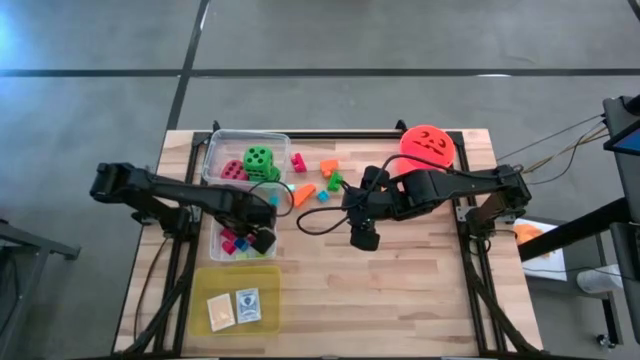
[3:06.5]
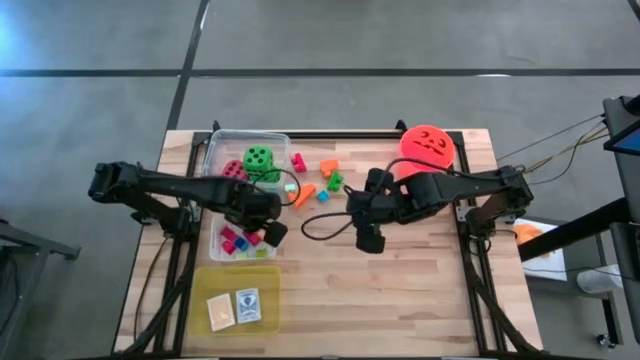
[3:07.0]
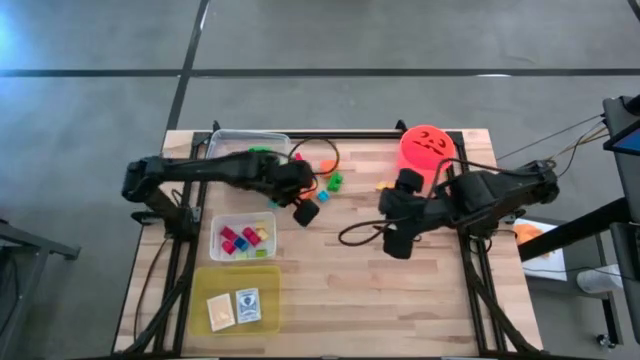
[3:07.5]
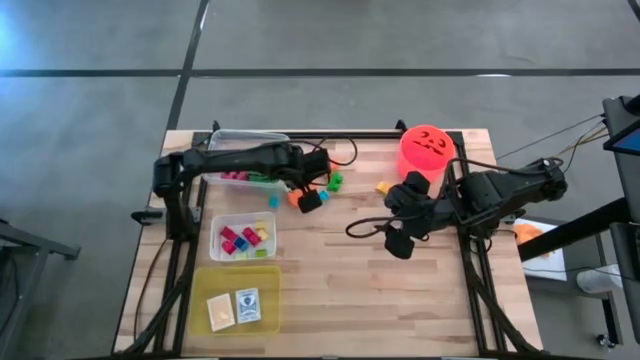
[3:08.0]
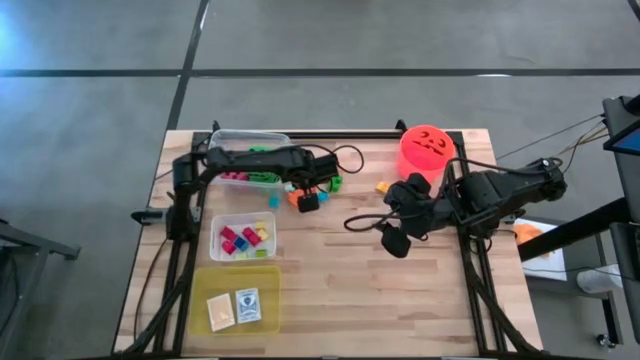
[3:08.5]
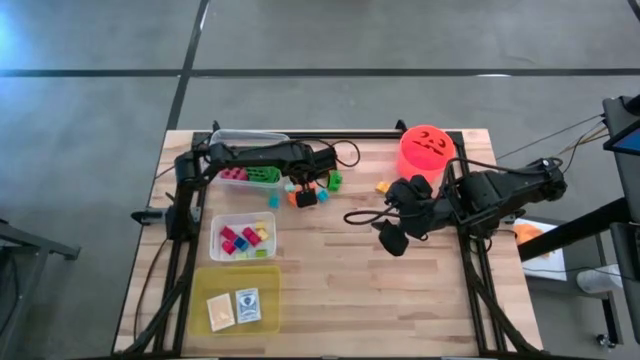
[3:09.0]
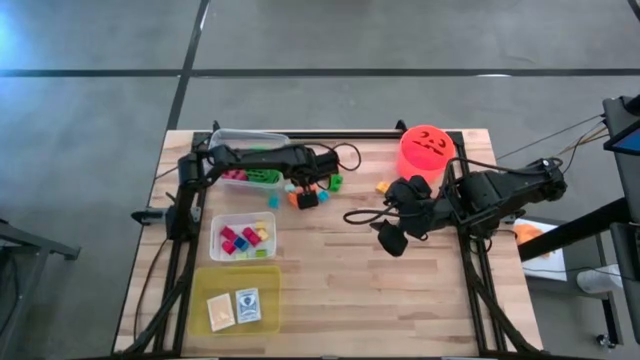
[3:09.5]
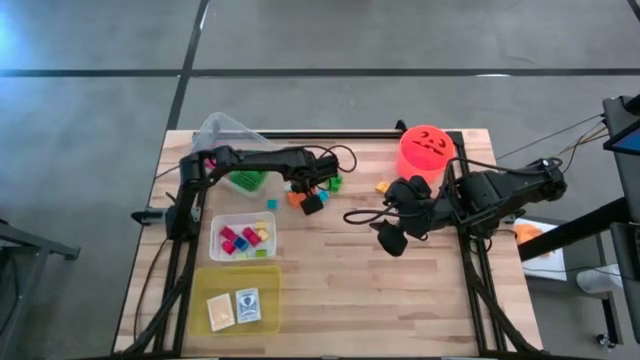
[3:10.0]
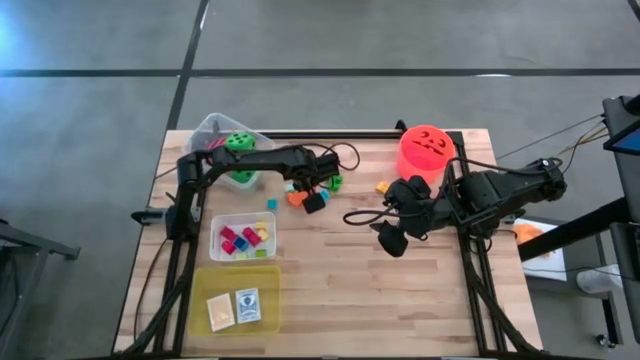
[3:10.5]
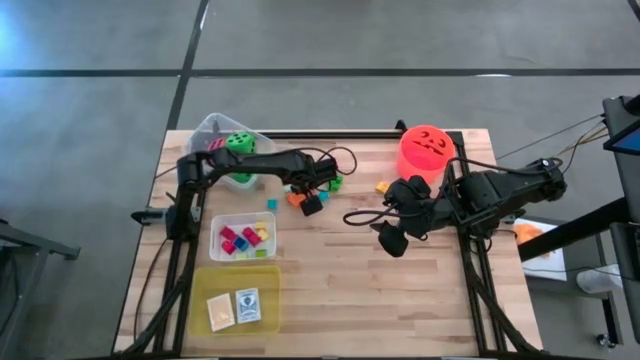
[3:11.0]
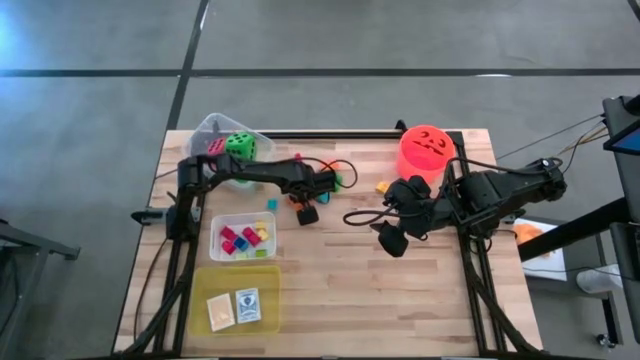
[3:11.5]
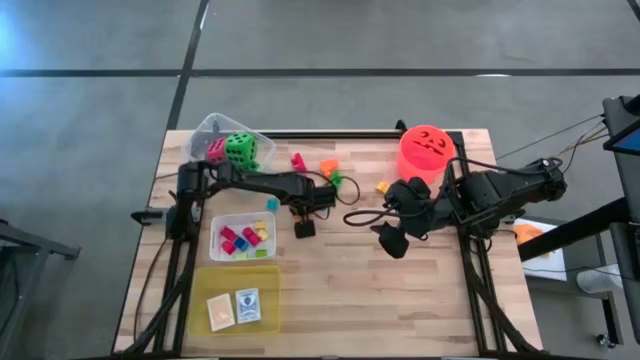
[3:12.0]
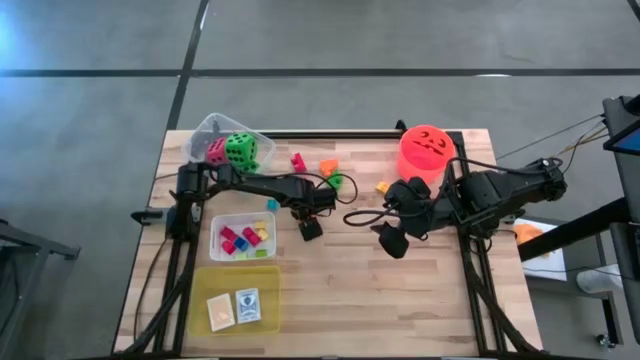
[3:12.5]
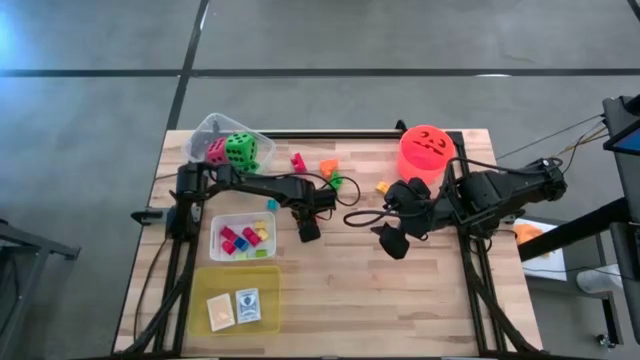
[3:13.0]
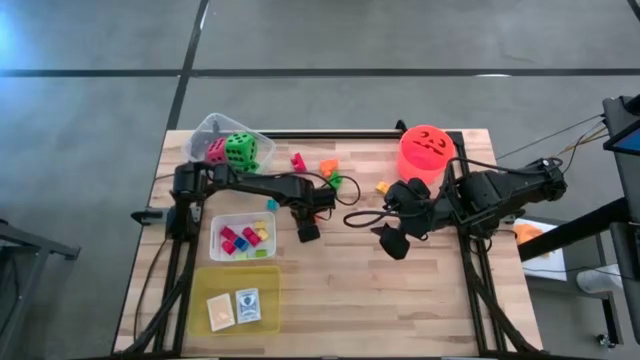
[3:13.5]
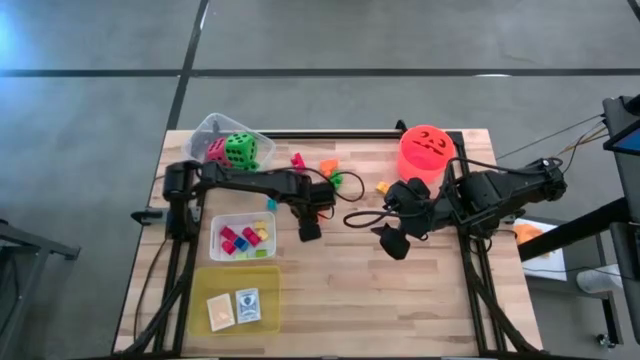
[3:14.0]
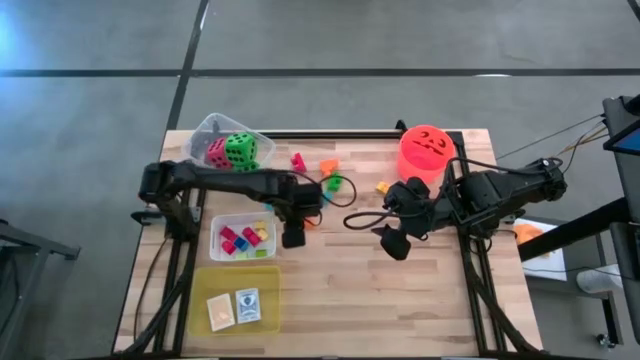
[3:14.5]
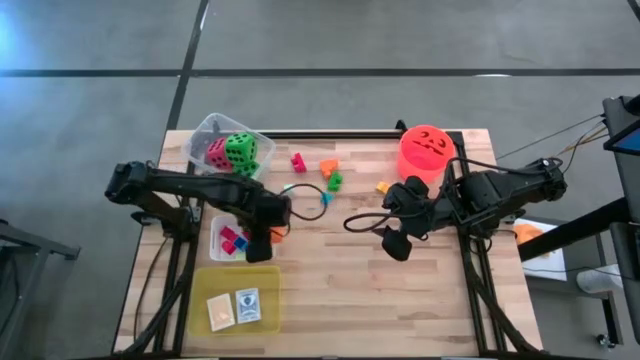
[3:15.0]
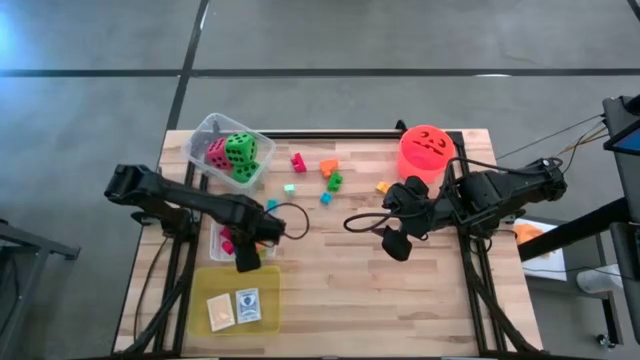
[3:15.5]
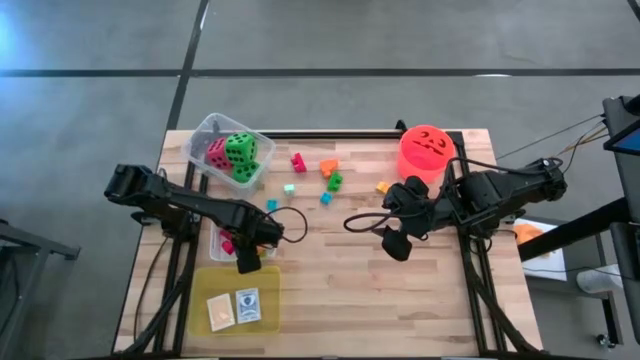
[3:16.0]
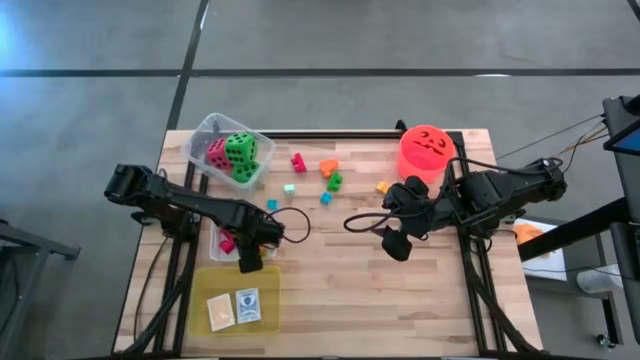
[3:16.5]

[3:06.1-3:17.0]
Task: Pick & Place Toys
Put the orange game piece into the white bin

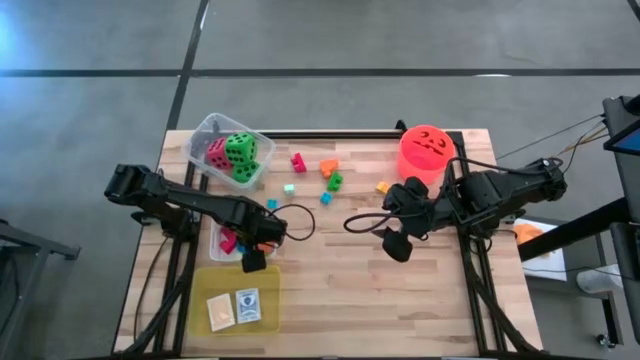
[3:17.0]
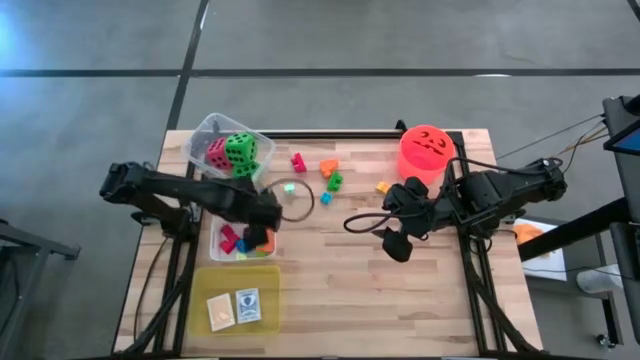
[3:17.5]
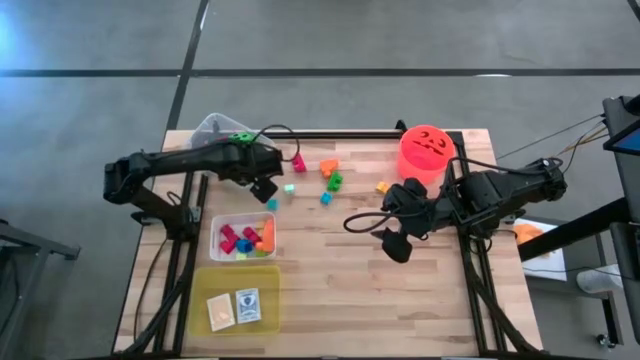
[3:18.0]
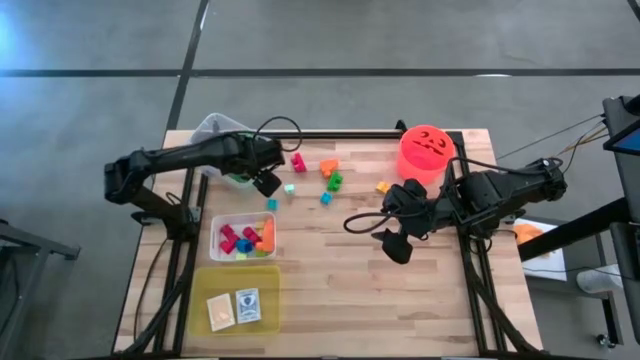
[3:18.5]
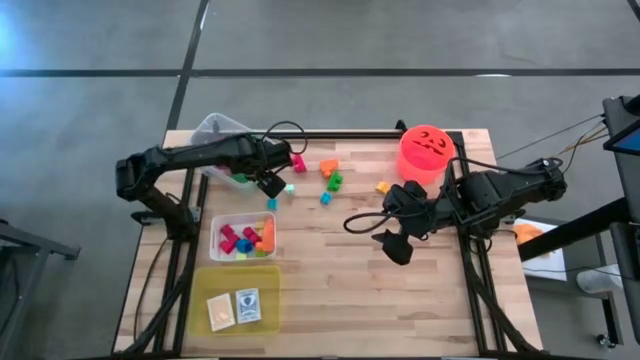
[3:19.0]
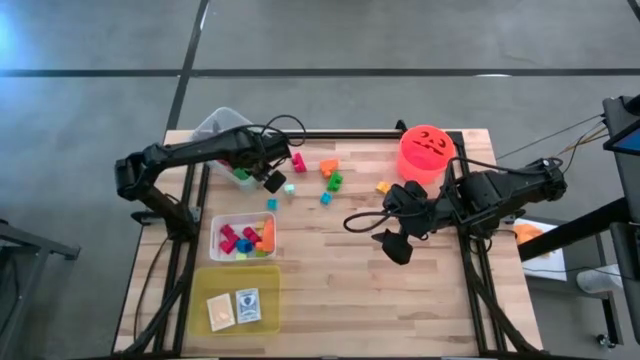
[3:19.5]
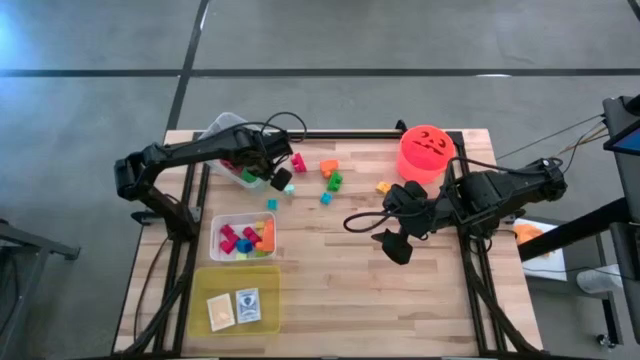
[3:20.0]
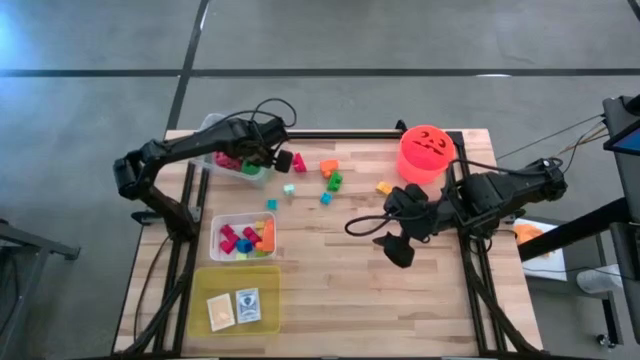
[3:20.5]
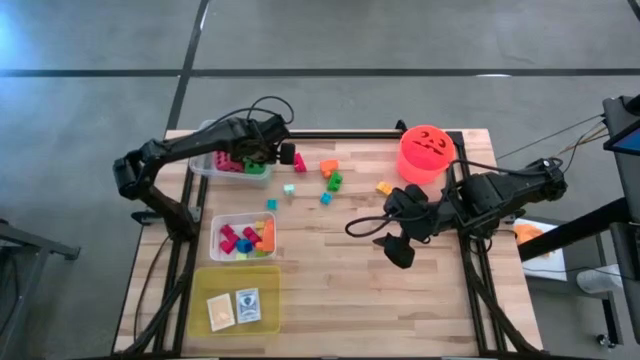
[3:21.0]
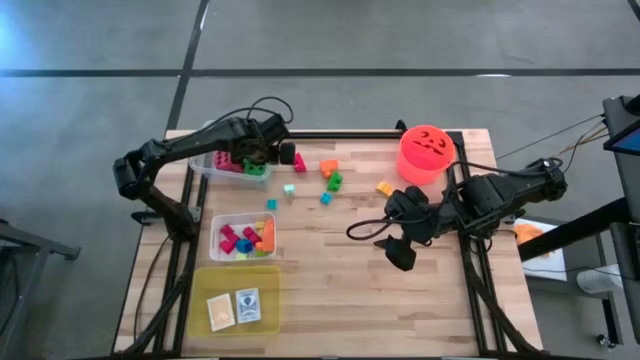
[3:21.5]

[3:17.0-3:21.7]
Adjust the transparent bin

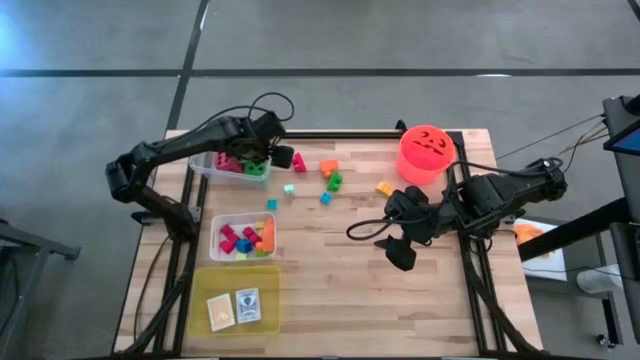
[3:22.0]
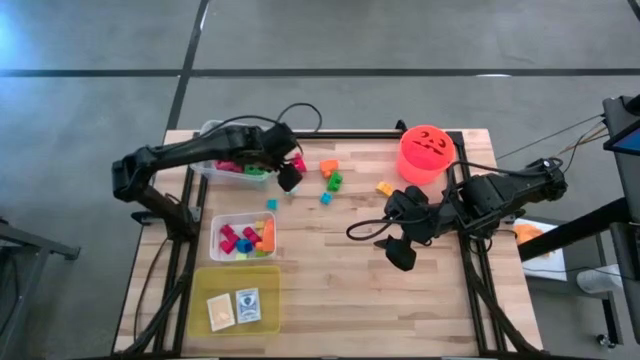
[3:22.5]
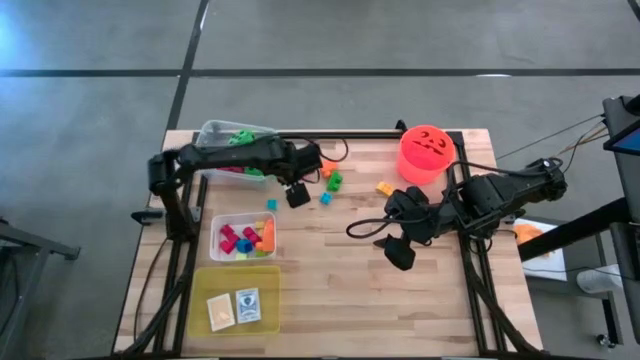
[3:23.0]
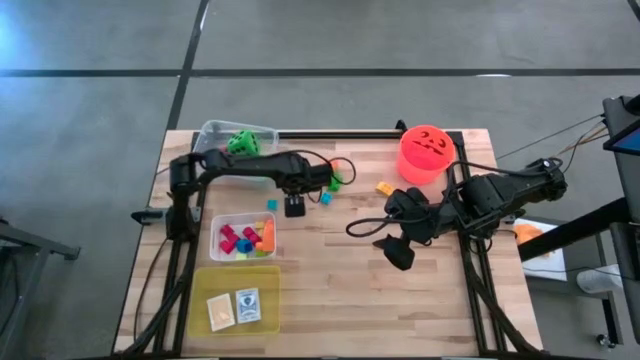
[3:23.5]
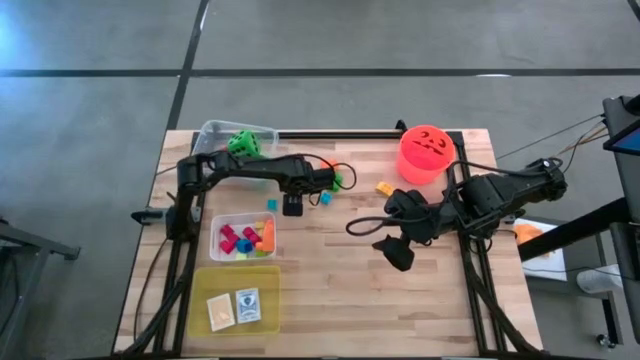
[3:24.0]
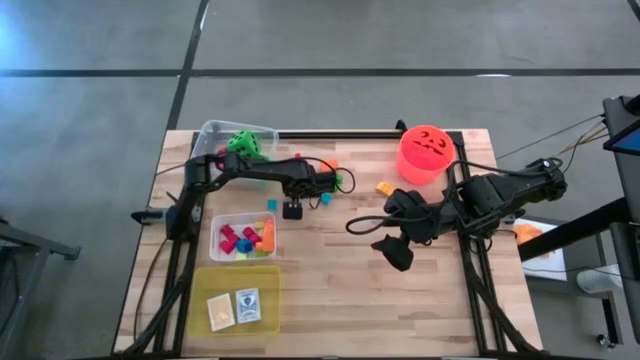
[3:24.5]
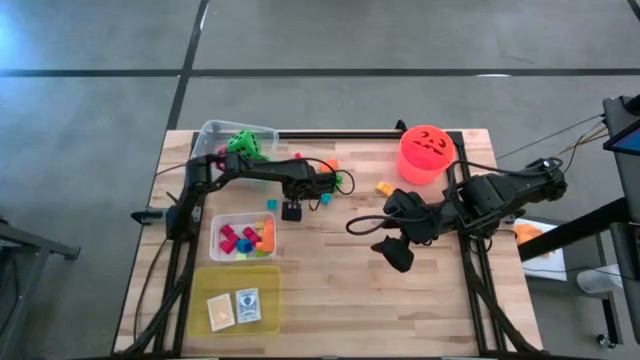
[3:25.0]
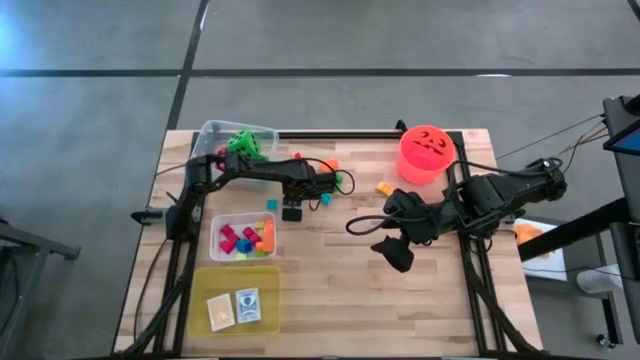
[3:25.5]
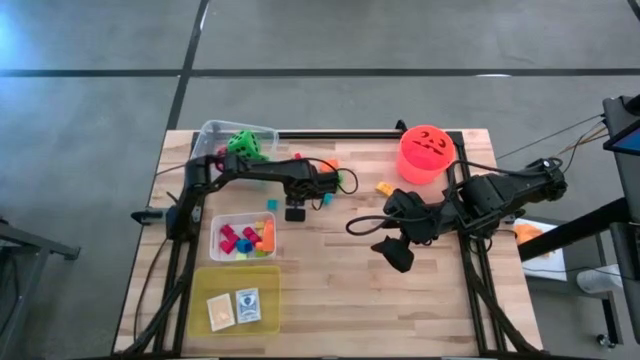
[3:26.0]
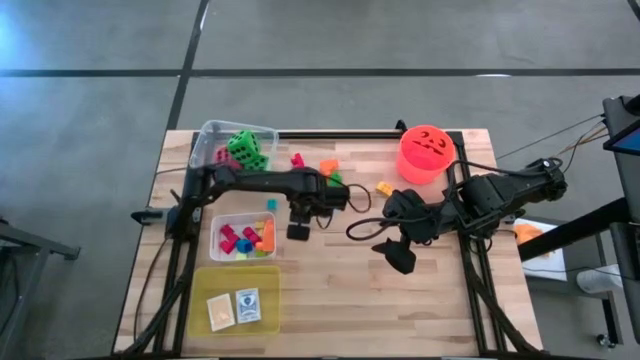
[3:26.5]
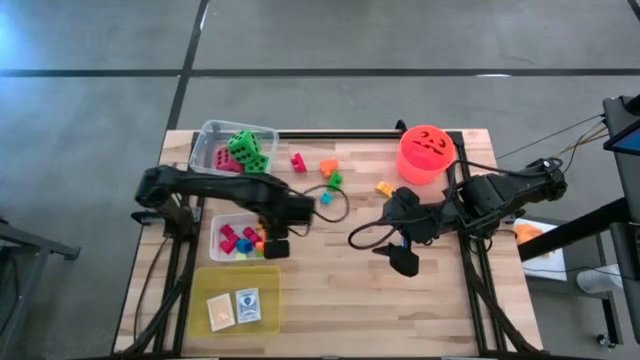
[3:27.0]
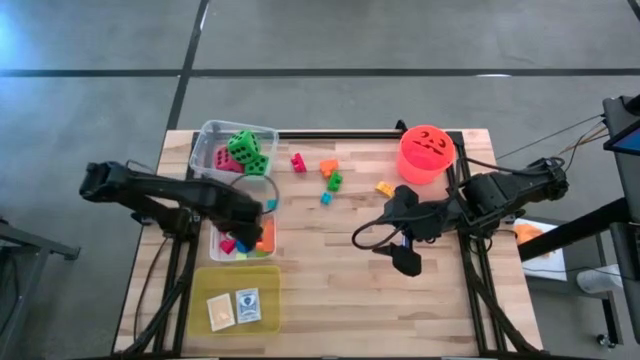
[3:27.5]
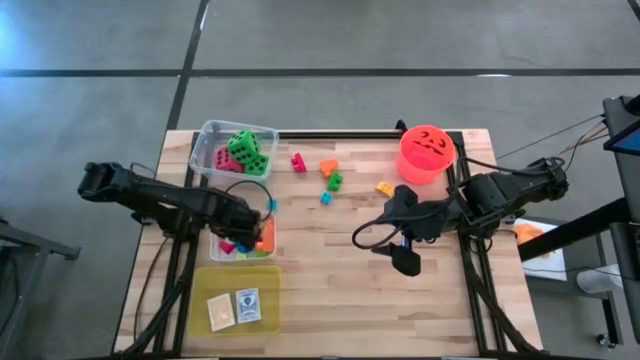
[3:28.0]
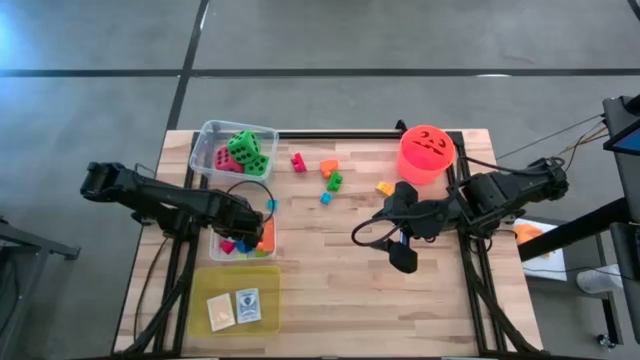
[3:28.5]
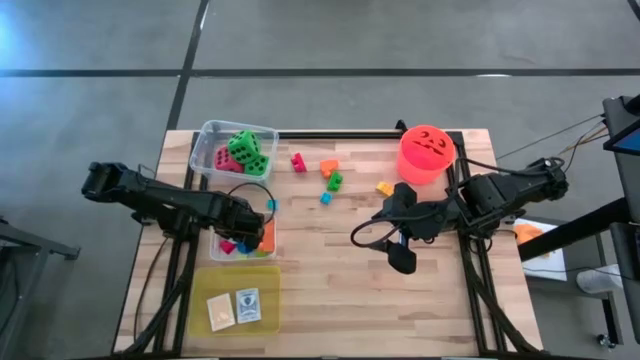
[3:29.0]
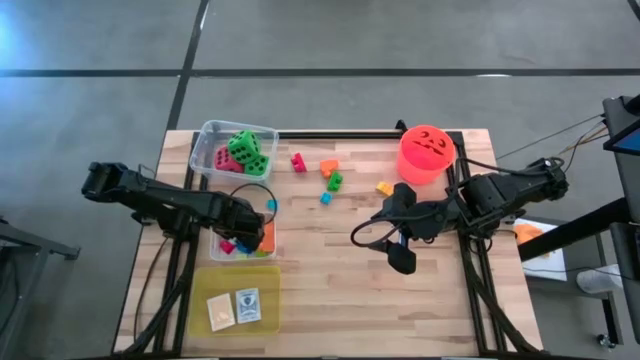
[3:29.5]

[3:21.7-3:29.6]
Put the light blue game piece into the white bin
